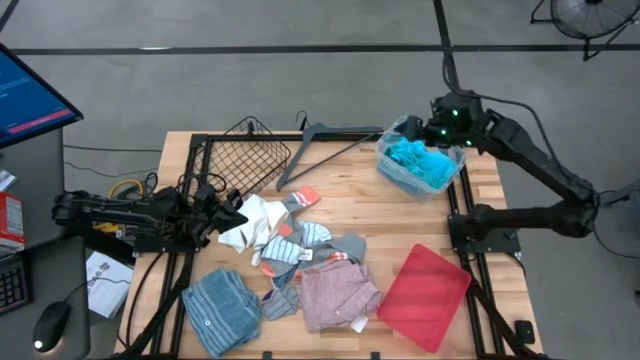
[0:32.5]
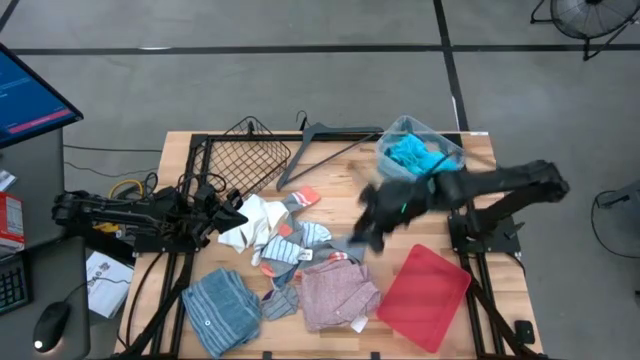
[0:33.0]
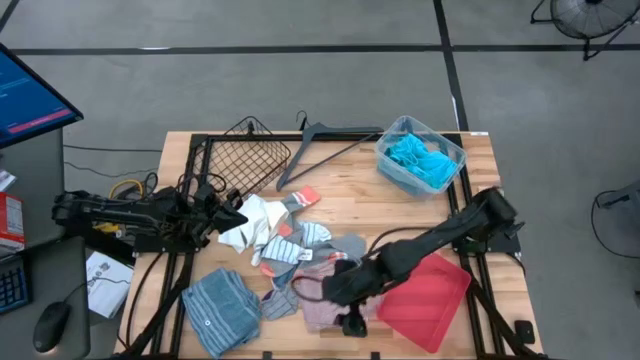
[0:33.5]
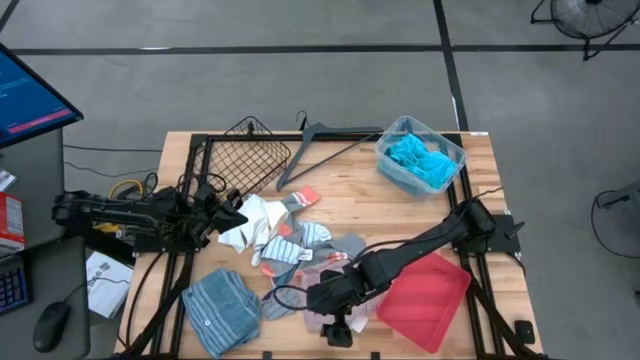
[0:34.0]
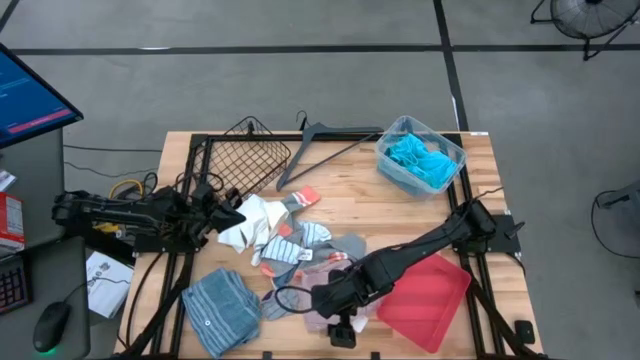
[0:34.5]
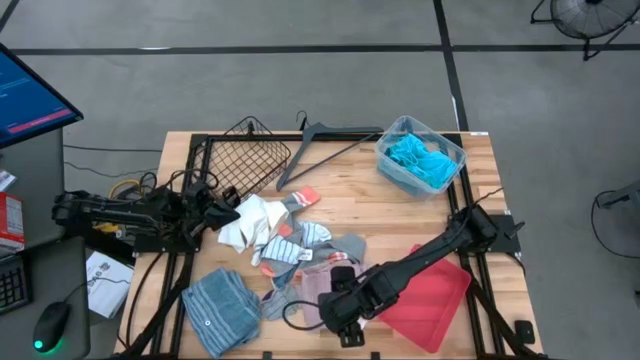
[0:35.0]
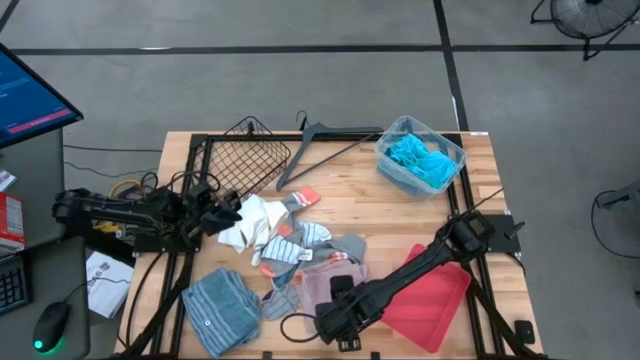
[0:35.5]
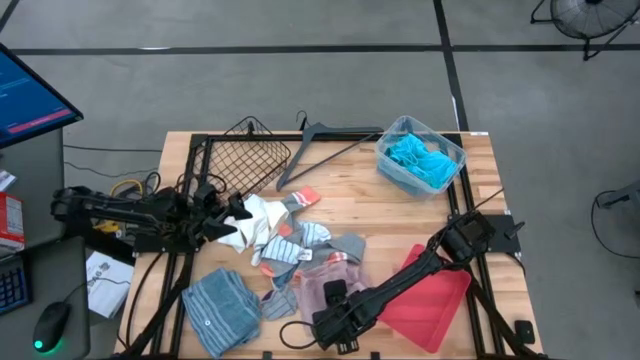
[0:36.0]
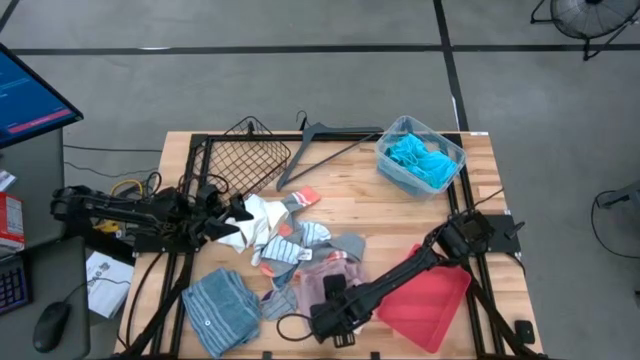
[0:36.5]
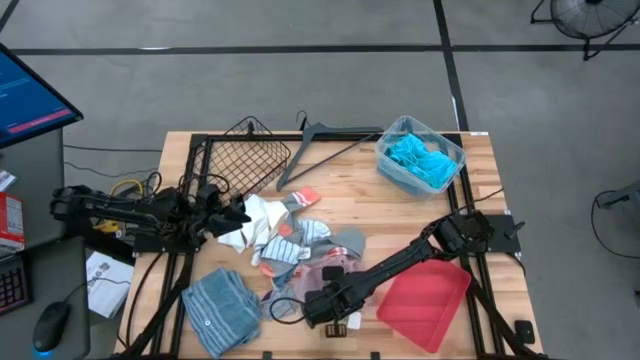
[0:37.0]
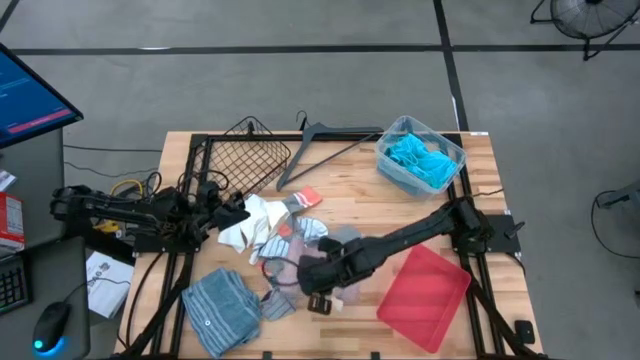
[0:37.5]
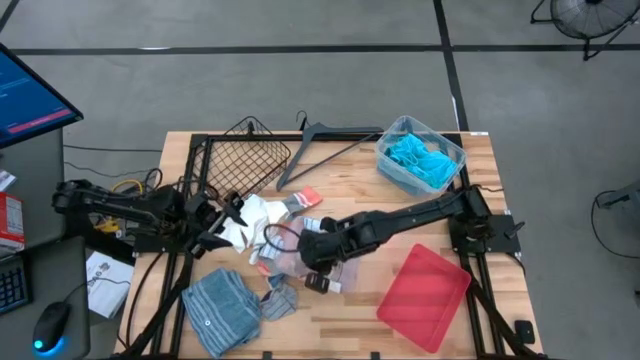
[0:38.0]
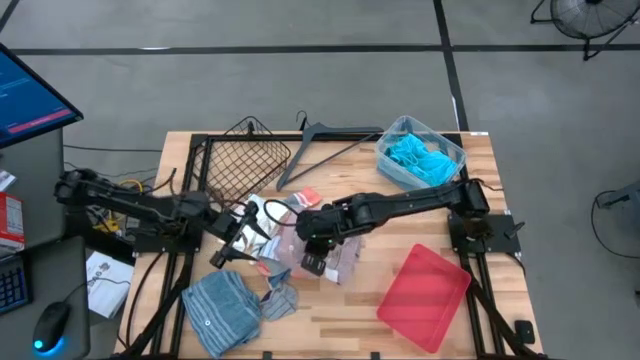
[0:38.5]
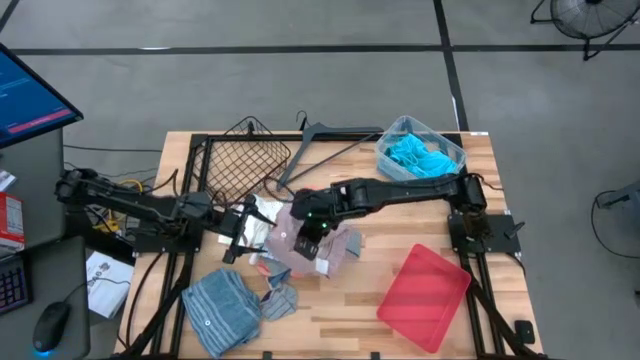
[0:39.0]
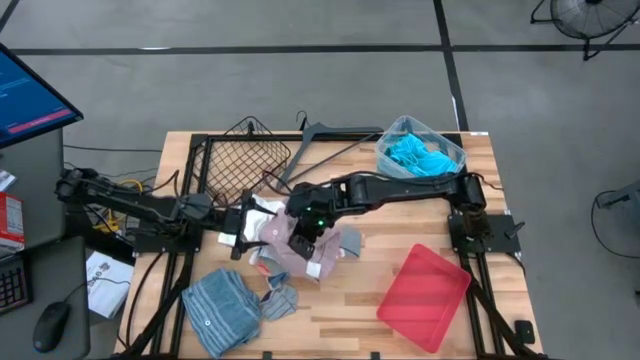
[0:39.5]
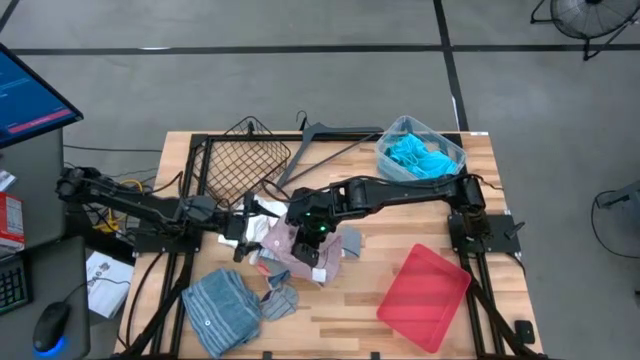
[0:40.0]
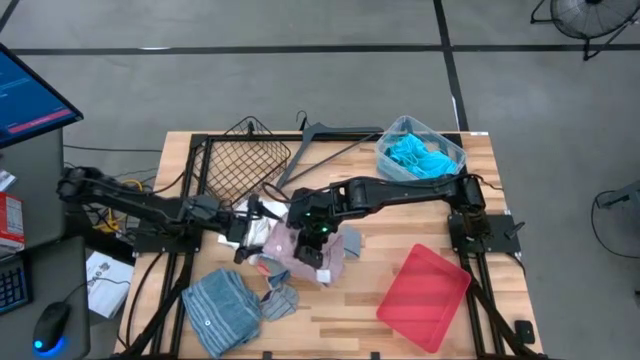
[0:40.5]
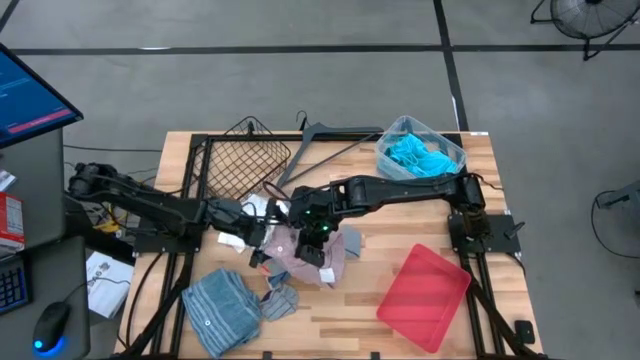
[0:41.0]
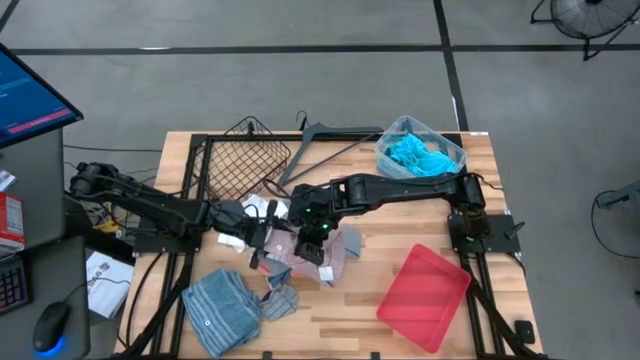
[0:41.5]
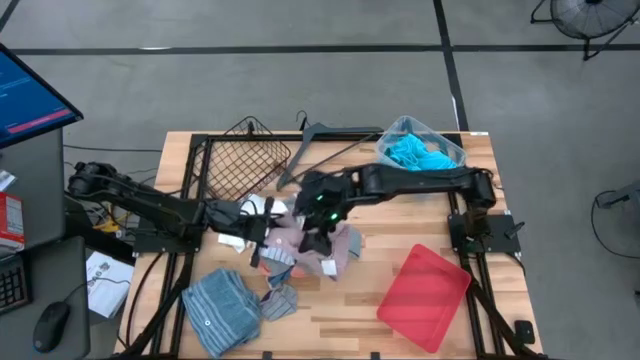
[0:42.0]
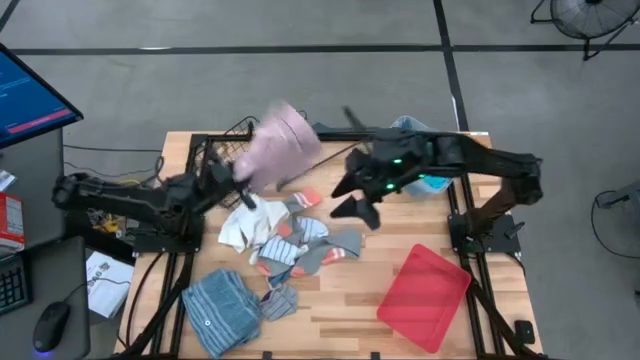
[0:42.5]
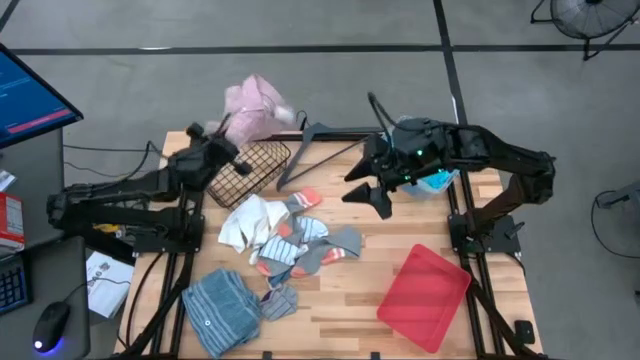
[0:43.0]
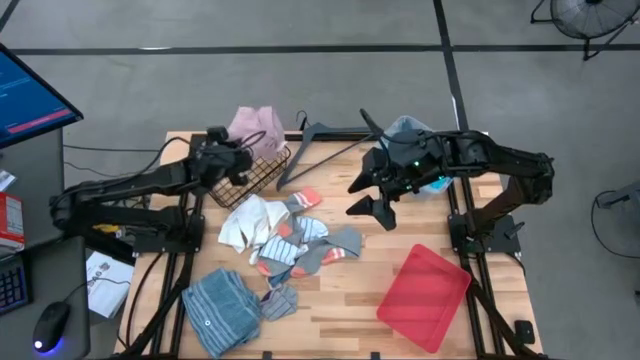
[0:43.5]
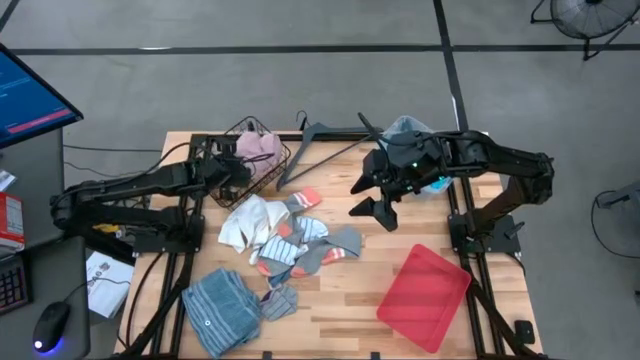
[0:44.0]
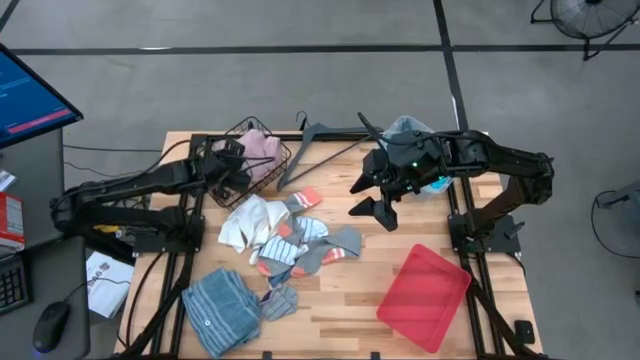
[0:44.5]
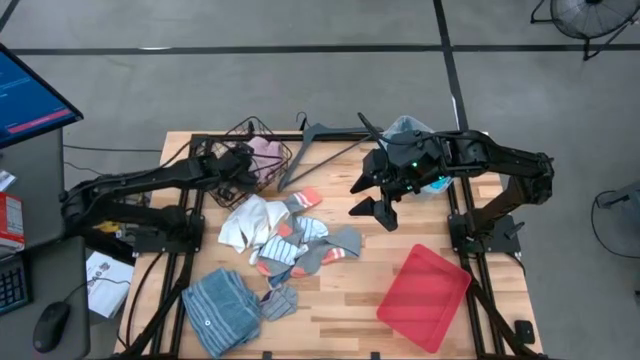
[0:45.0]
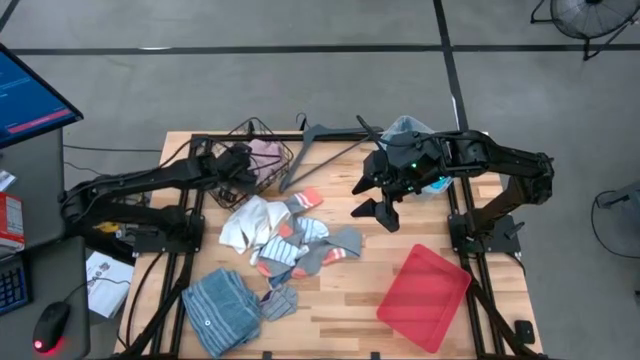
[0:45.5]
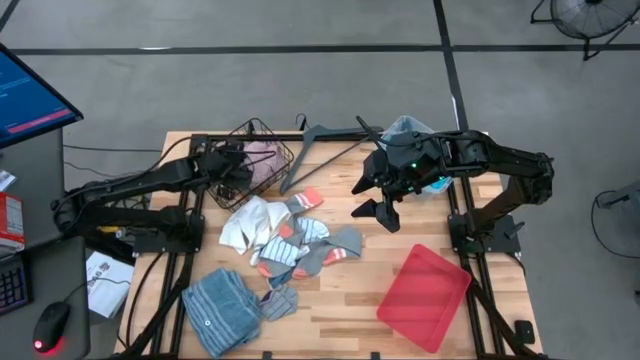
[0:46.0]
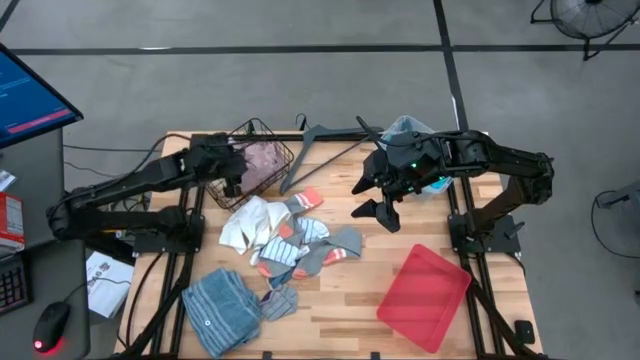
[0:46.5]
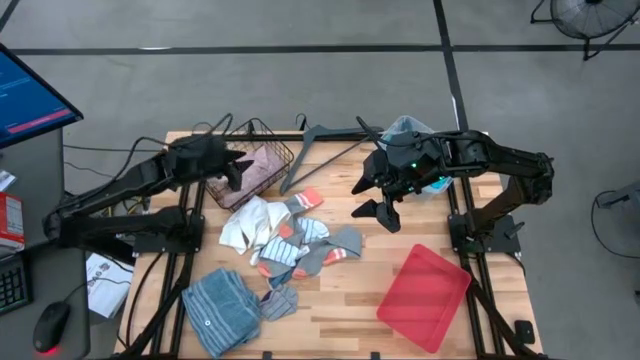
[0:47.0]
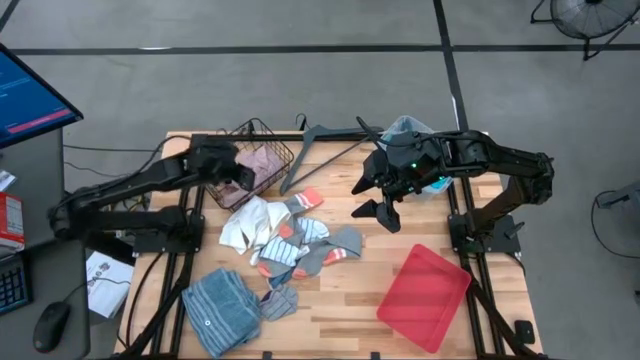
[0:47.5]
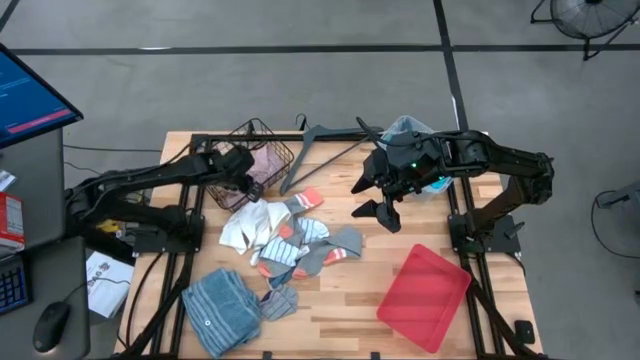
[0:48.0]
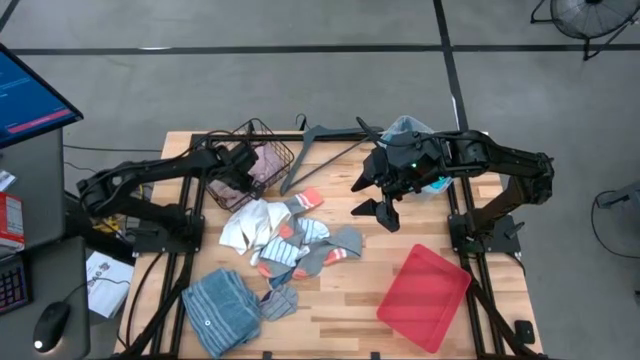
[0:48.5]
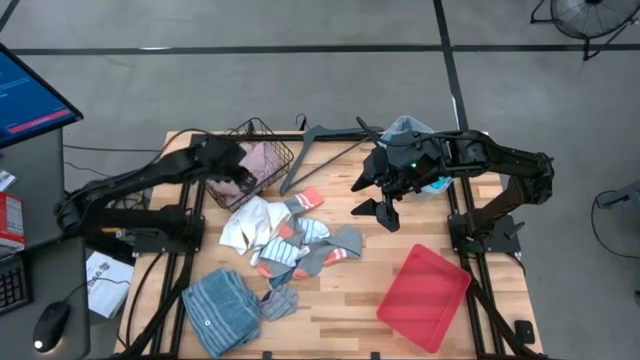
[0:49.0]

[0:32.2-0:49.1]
Task: Pick & Place Cloths
Put the pink polo shirt into the black wire basket
